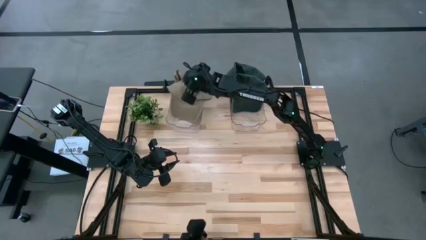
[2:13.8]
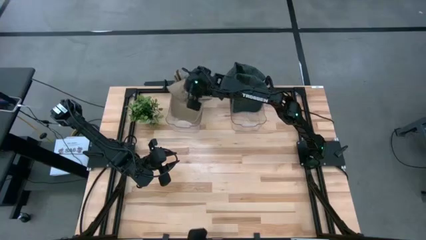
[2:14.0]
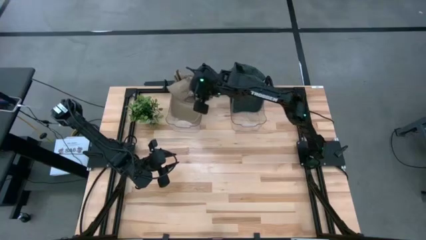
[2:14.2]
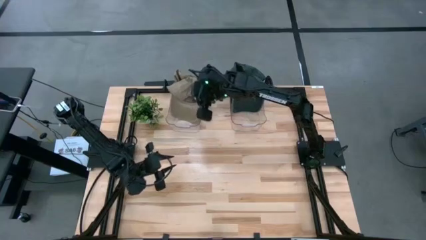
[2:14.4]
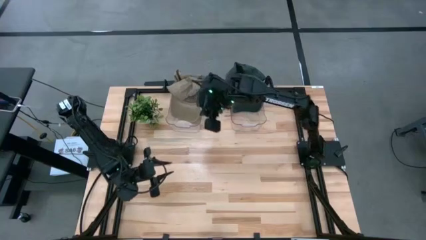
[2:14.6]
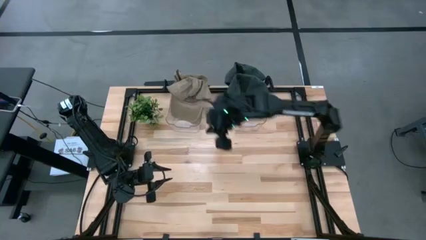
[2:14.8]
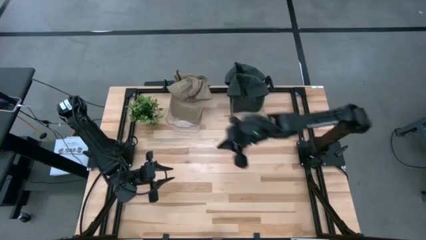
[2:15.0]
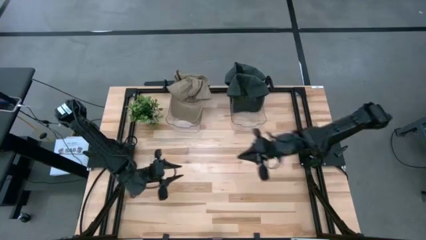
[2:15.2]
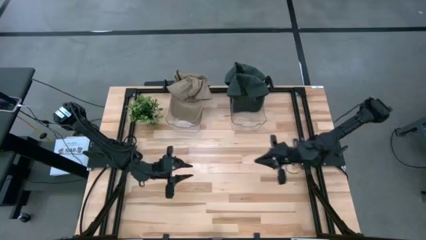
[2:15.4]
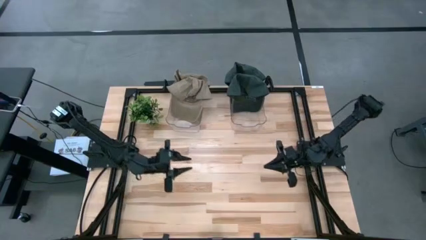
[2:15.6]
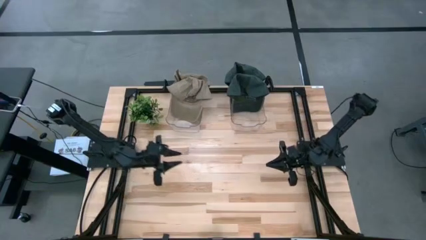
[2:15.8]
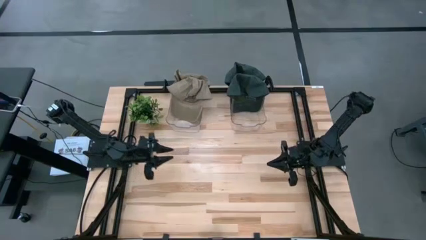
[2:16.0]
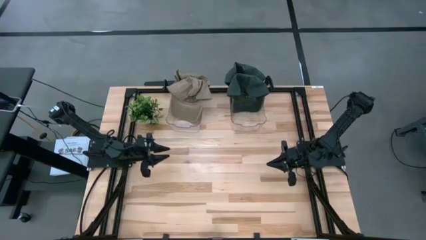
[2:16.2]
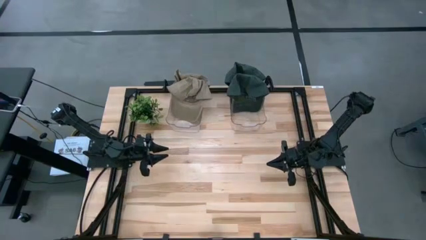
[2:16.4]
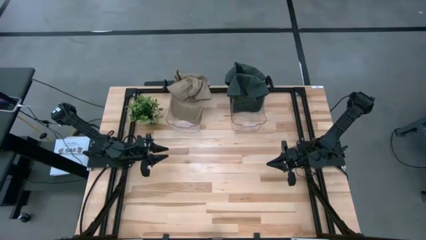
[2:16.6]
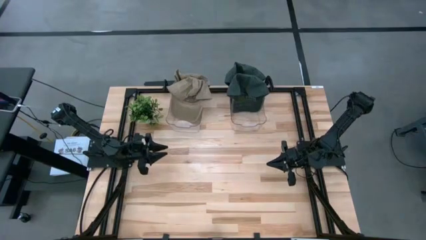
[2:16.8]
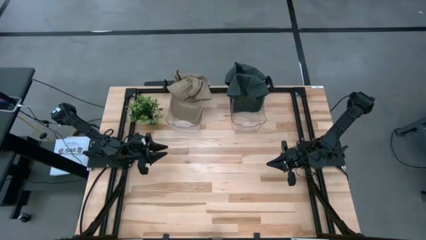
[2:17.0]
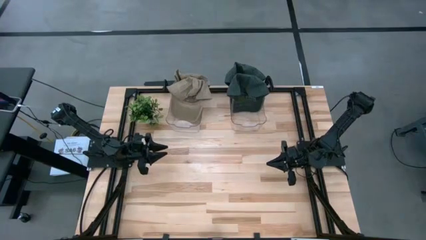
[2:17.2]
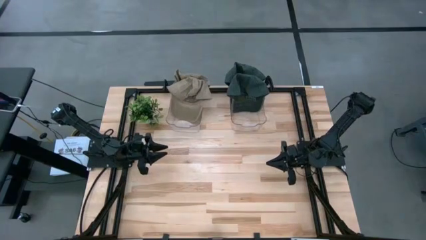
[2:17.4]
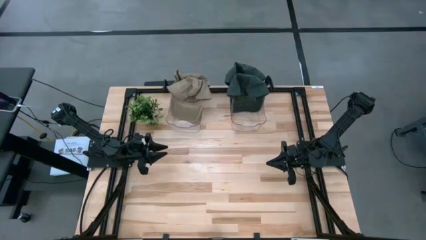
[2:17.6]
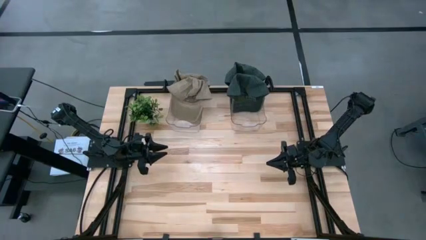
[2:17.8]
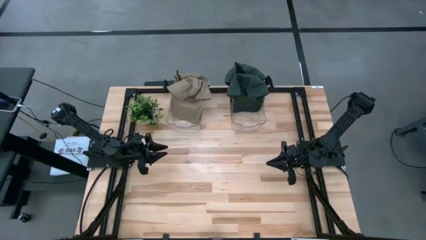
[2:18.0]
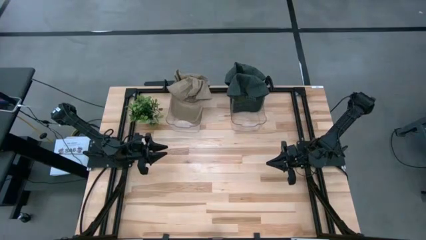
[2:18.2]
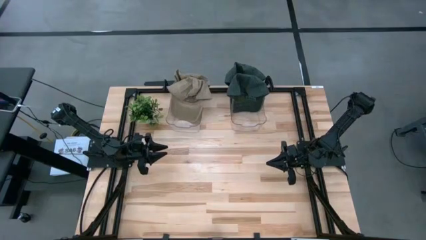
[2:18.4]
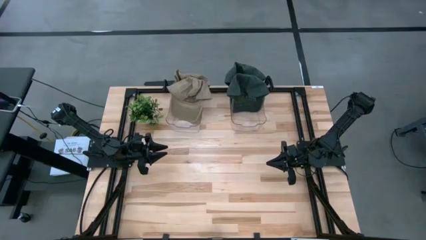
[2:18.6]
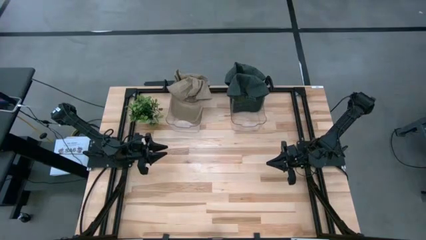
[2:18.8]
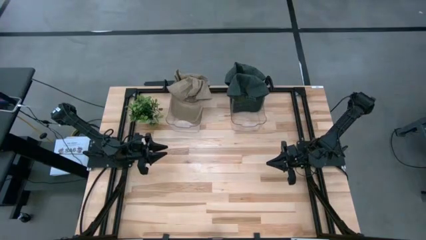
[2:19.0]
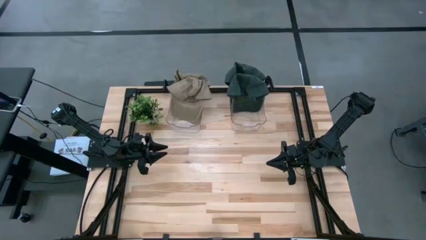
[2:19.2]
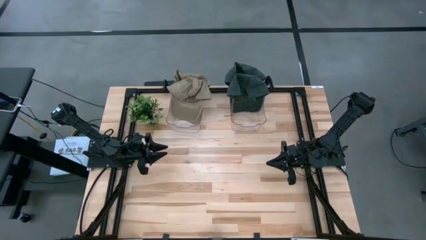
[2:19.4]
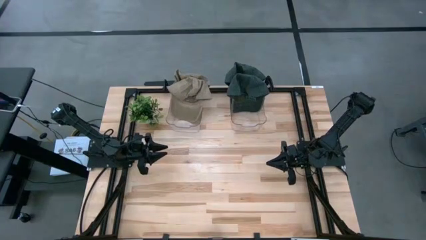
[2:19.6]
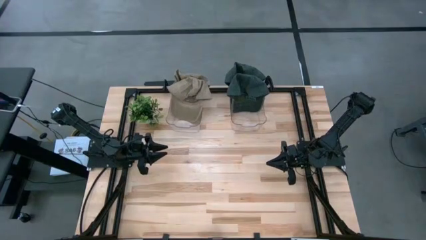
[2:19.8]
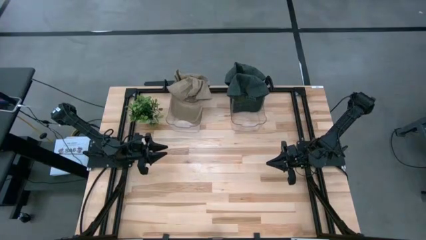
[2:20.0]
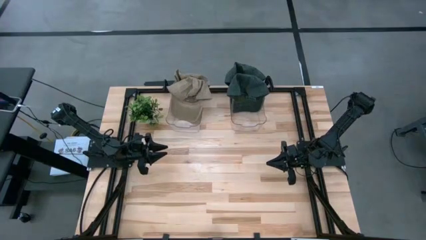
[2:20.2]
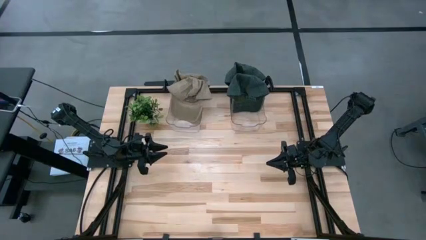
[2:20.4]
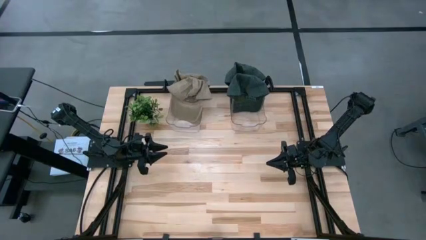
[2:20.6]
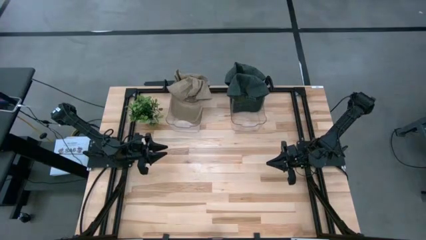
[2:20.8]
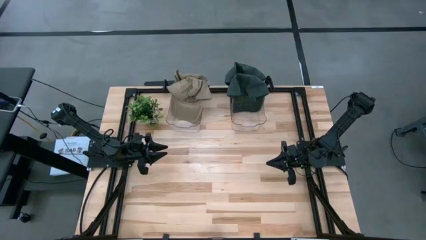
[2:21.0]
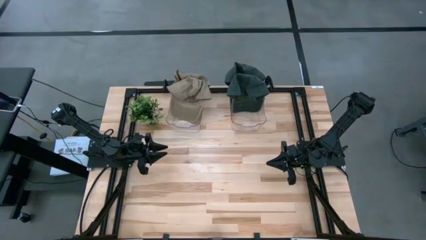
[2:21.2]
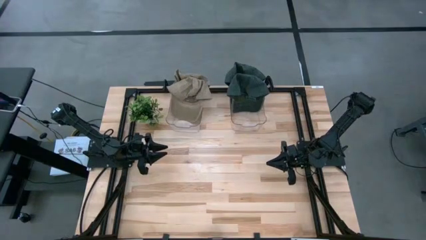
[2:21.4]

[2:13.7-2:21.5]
Task: Pick & Place hat
Return to Home Position

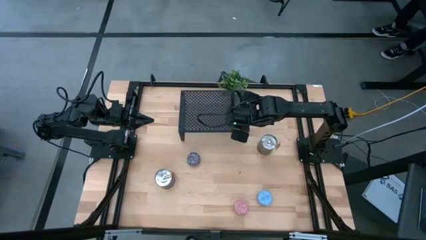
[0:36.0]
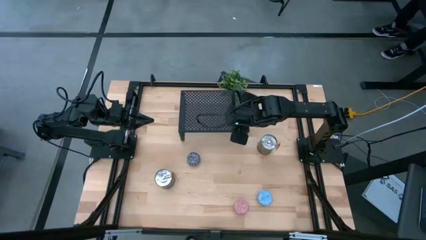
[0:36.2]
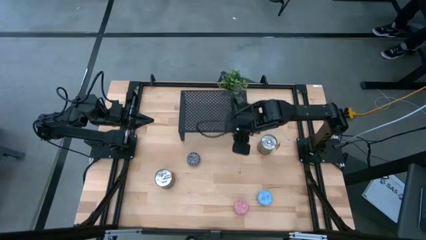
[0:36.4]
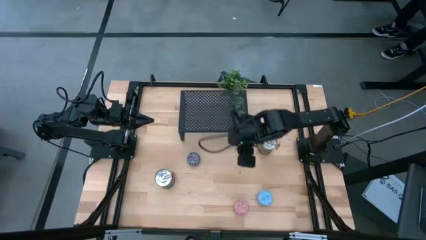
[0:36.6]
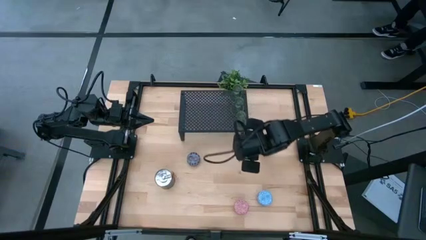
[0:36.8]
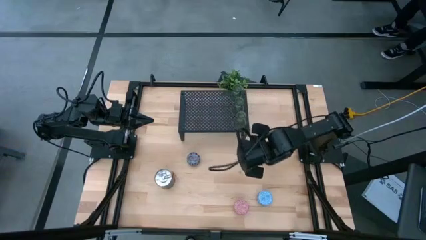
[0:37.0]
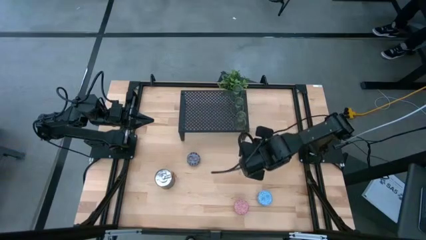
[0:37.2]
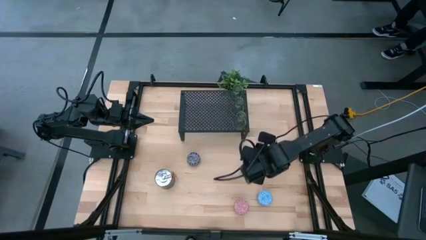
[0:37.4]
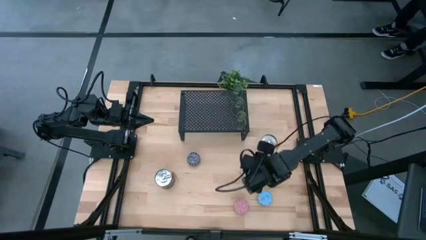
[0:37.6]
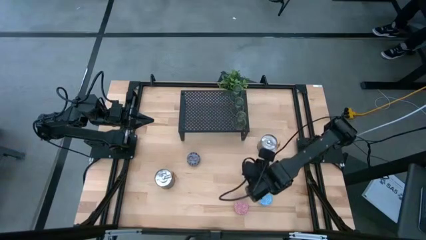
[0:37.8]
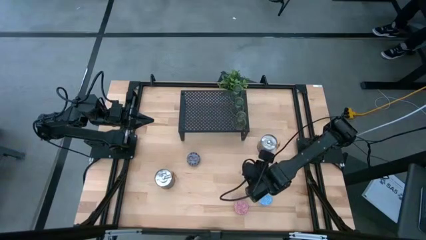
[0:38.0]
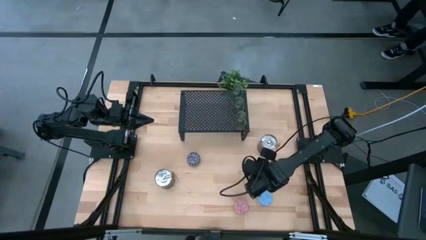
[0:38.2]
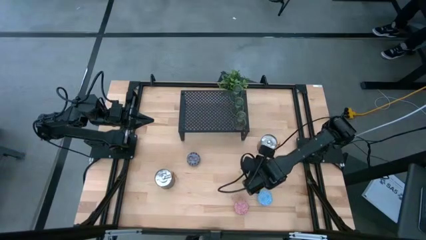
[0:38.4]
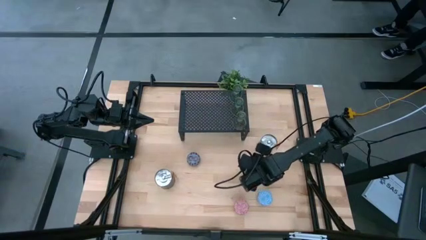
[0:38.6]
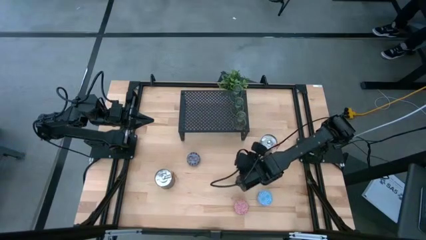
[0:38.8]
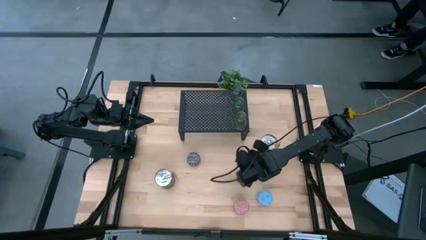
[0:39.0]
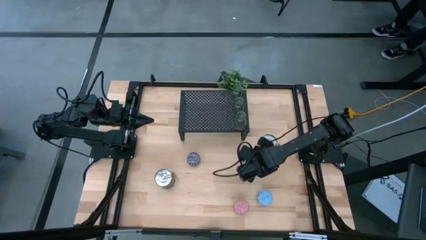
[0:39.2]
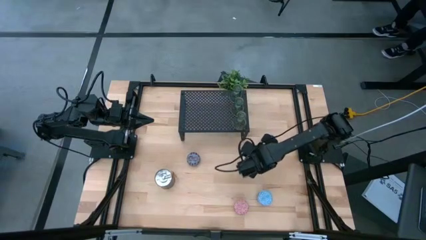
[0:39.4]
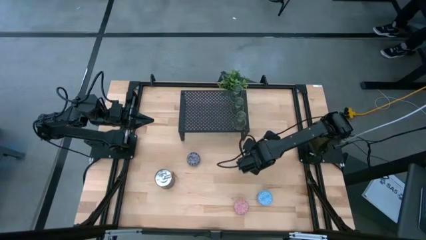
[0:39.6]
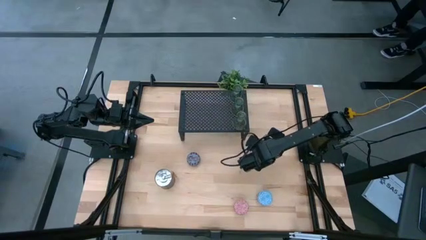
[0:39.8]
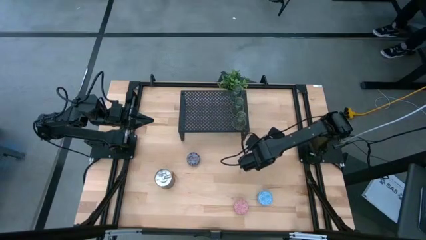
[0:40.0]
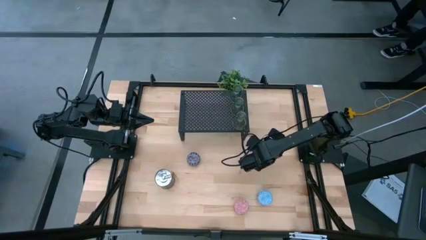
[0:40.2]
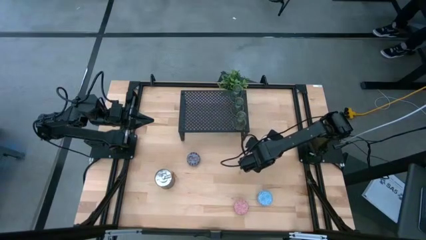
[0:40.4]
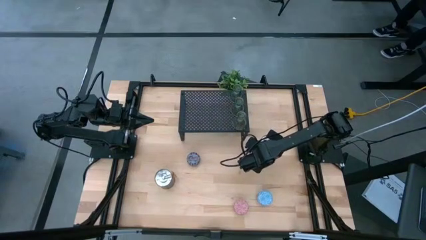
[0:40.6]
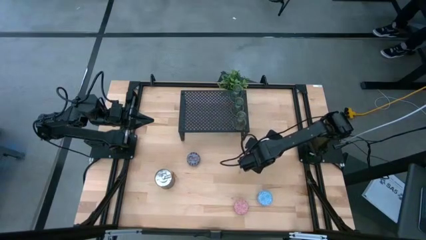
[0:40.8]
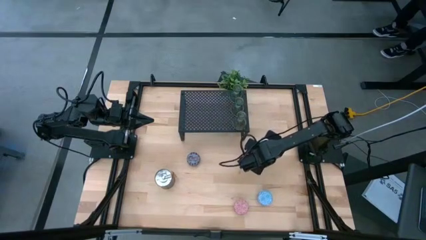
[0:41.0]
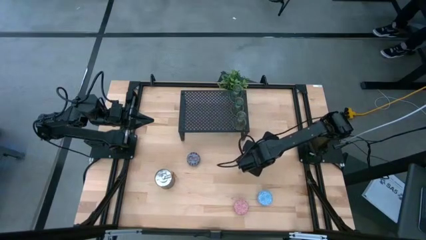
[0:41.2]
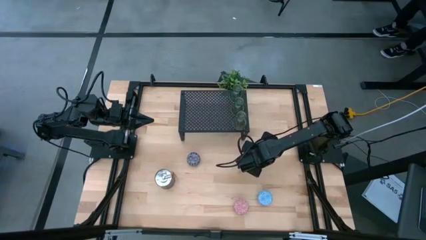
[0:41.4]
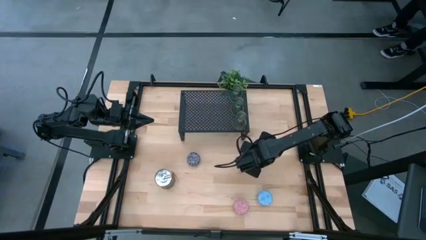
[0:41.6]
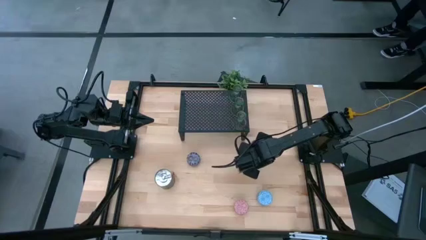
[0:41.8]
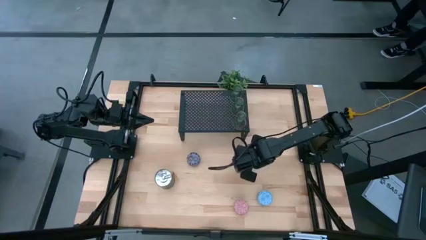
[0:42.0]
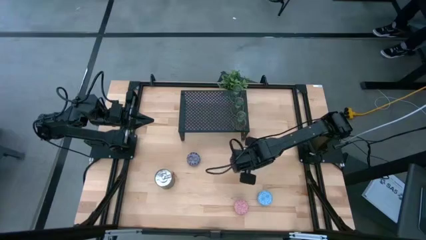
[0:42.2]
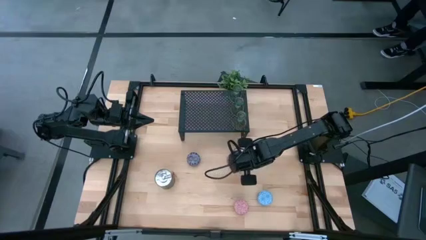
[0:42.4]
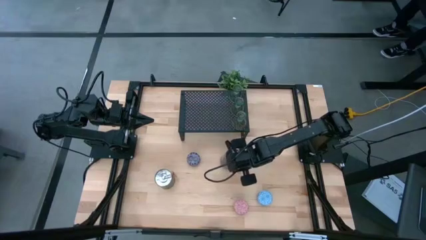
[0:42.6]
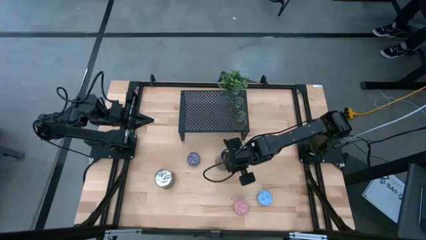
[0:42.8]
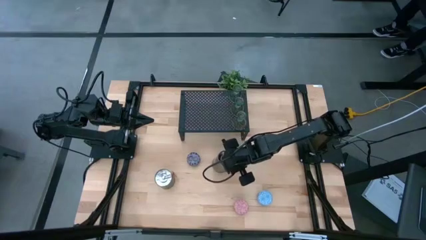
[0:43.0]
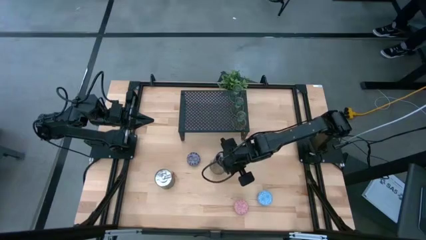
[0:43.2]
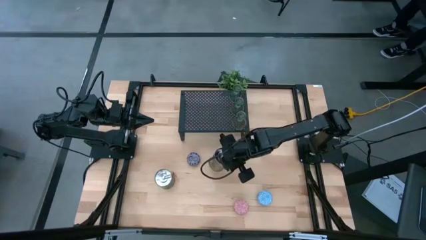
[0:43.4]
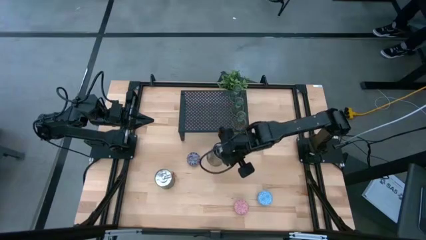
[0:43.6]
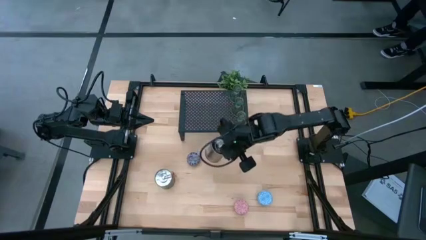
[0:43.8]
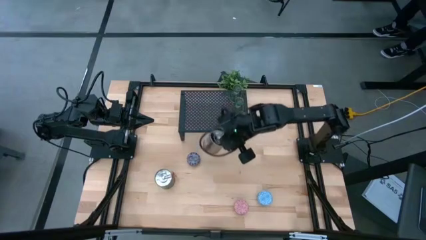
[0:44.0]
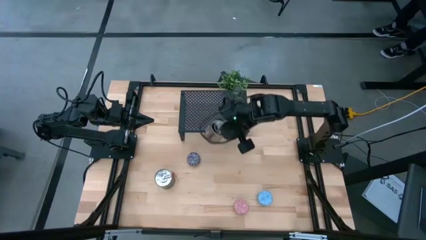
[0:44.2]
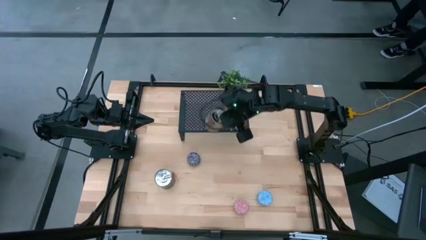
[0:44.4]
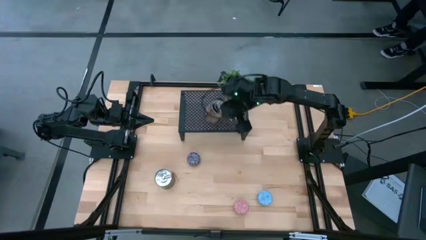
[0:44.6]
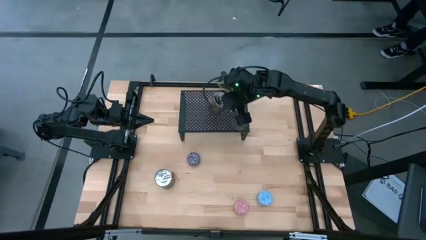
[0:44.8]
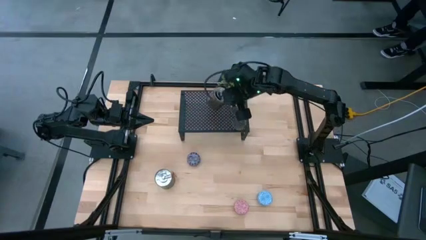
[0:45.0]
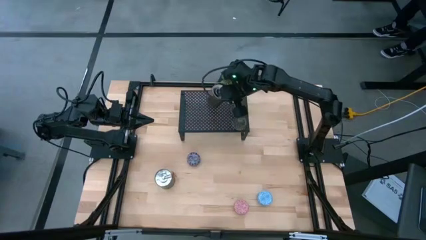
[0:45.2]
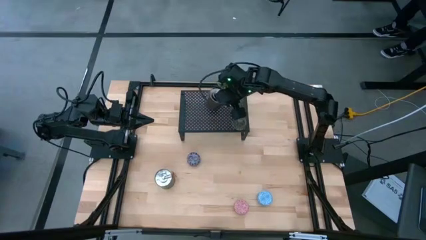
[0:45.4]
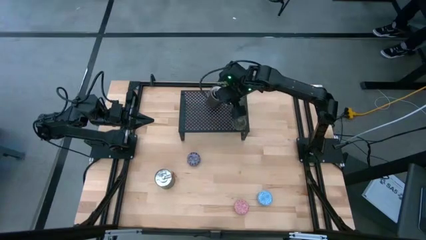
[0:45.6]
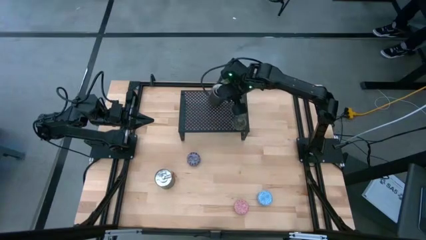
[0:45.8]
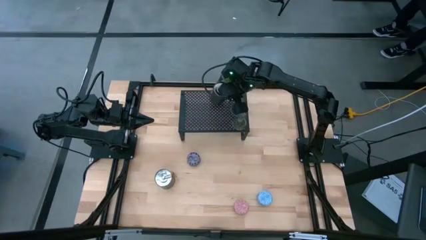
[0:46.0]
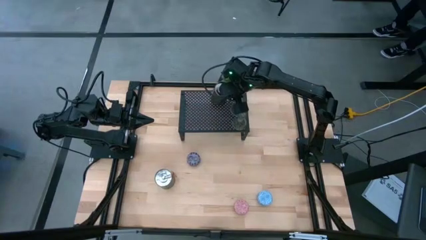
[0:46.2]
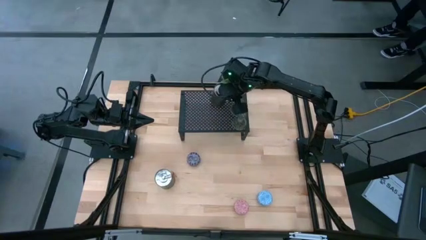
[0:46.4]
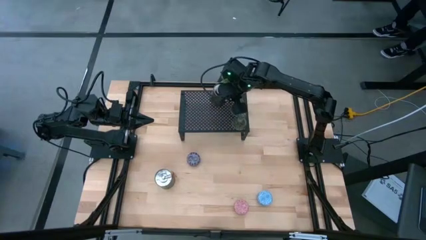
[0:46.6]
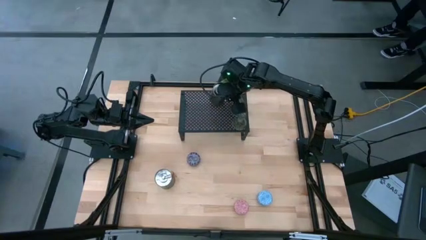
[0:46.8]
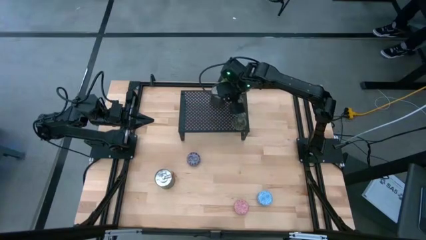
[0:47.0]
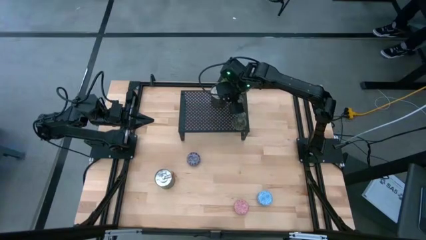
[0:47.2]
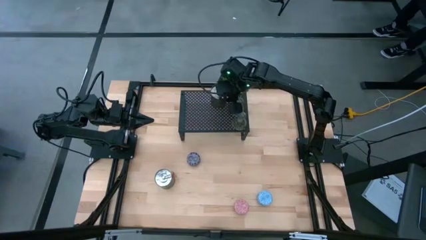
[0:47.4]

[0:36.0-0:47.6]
Task: Pick & Place candle stick holders
Put the top silver scented candle on the shelf
